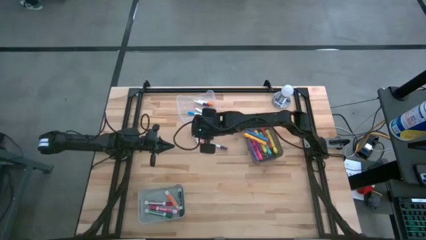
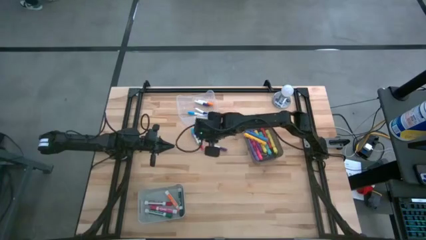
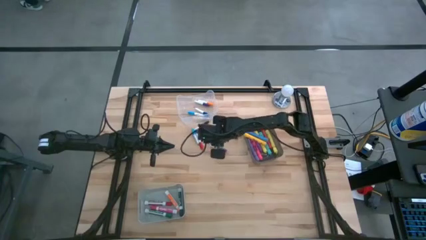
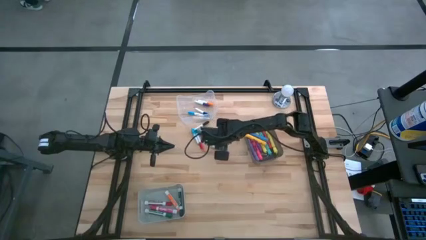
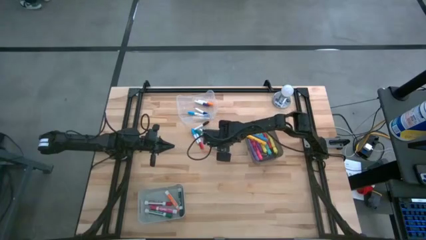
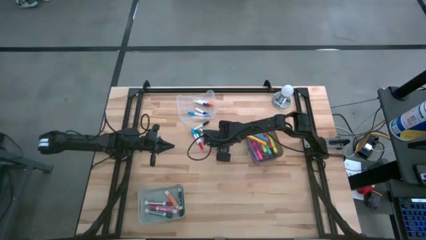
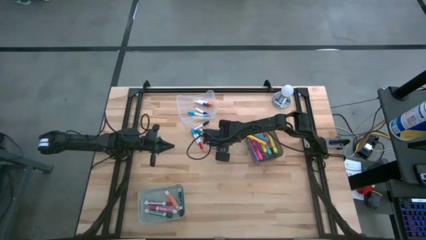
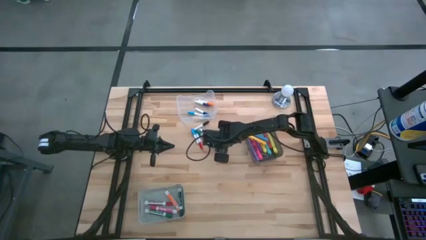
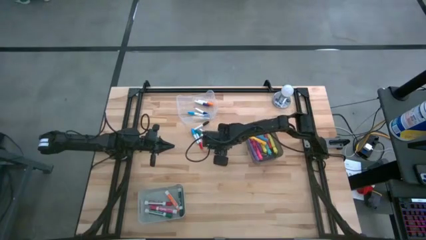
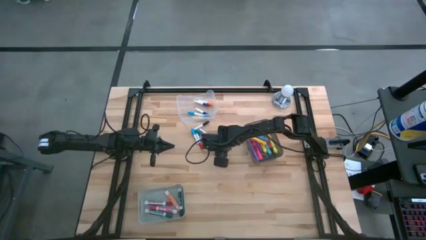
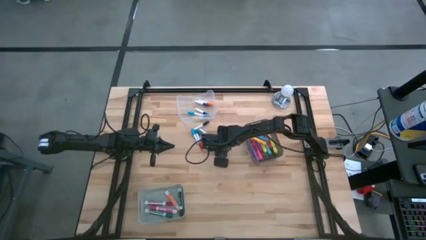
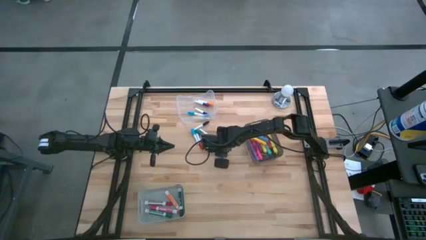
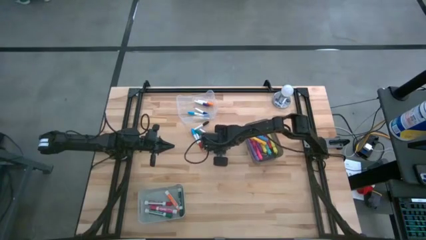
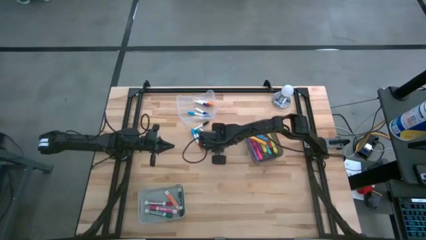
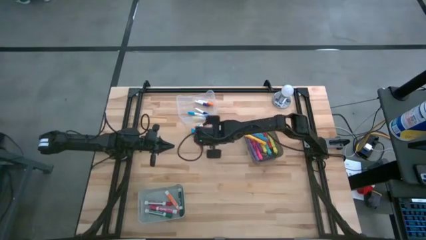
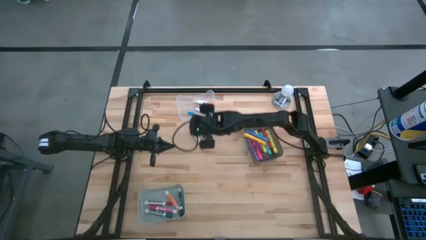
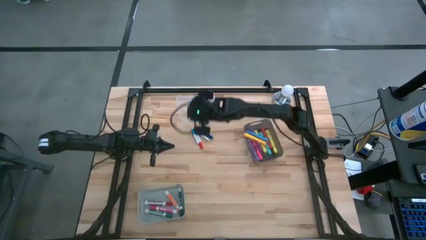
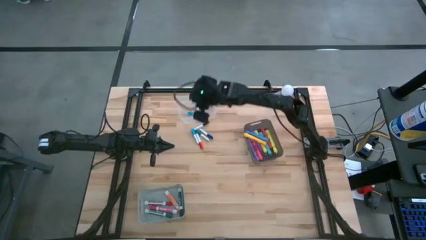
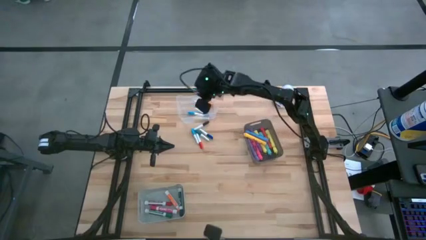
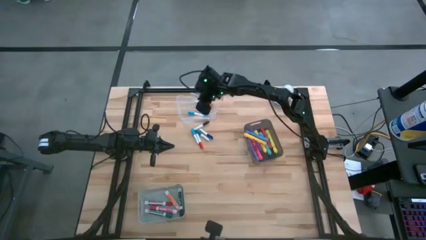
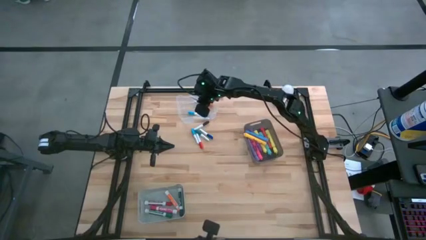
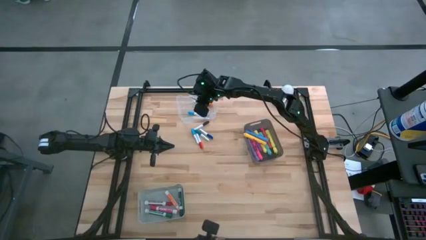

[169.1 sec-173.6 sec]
Task: Pick & Place Markers
Put the white and violet highlighter pen into the transparent bin

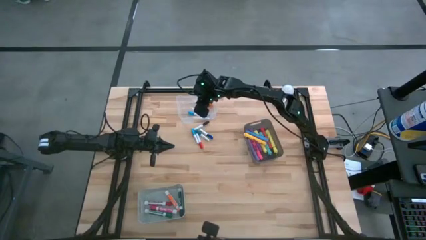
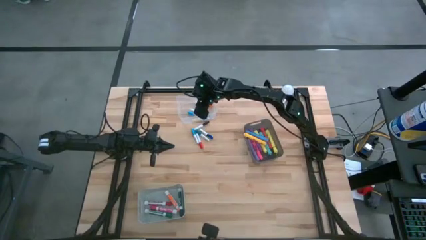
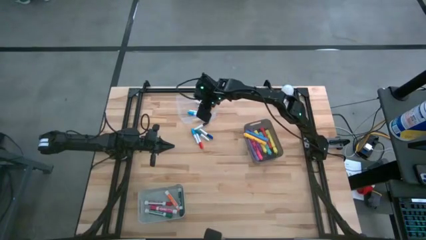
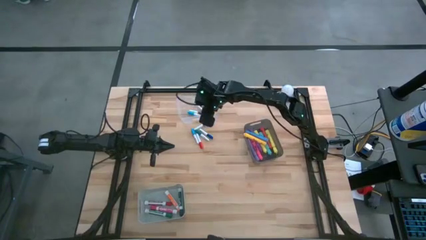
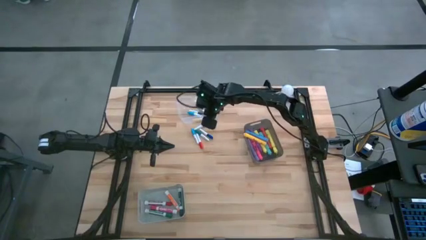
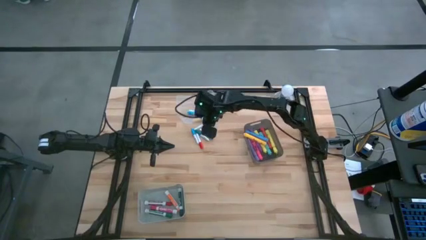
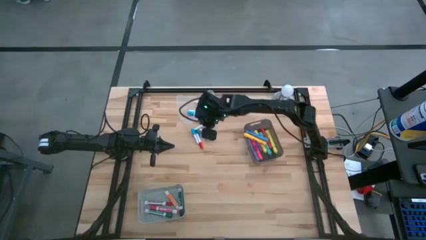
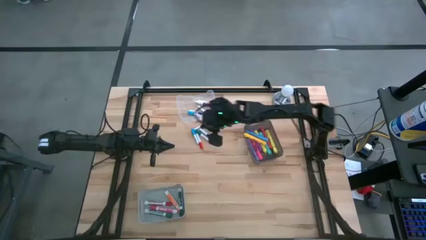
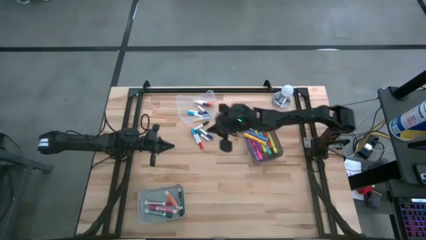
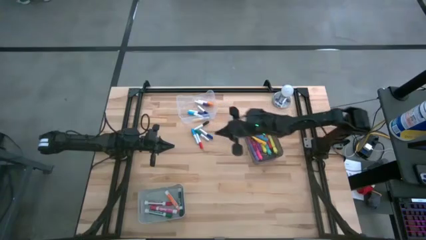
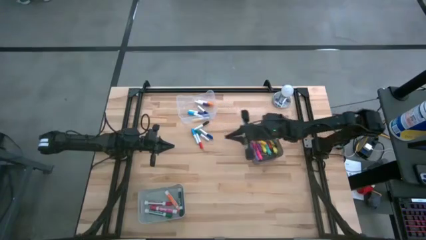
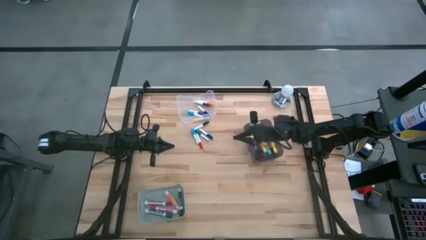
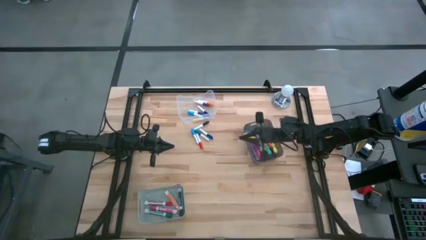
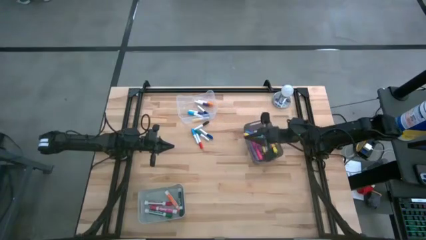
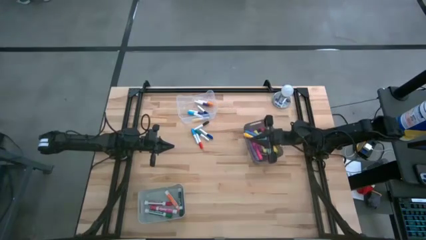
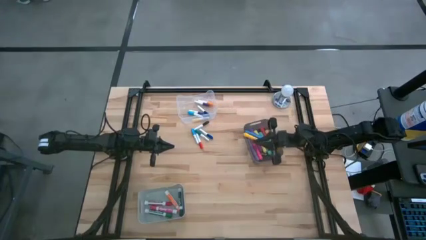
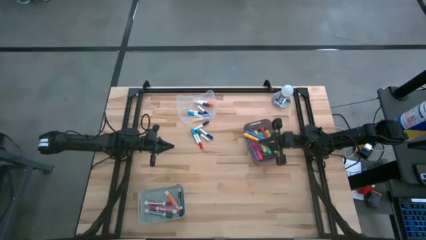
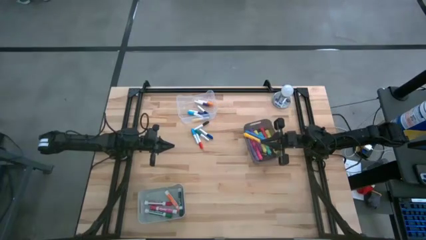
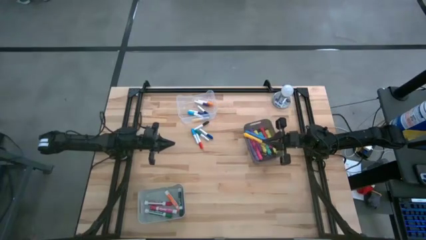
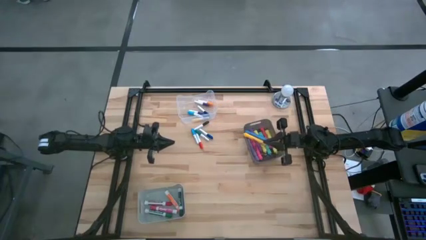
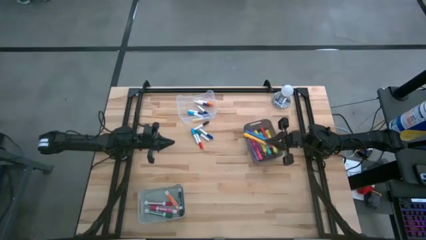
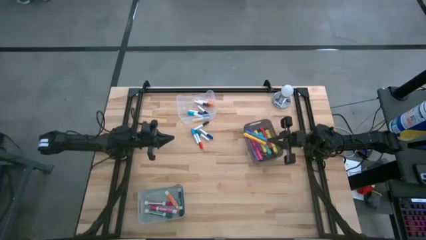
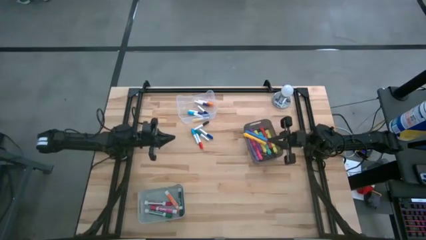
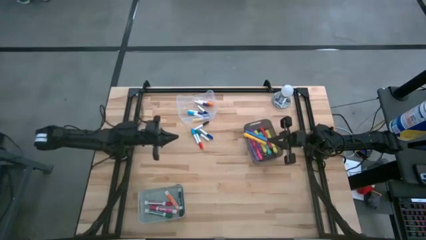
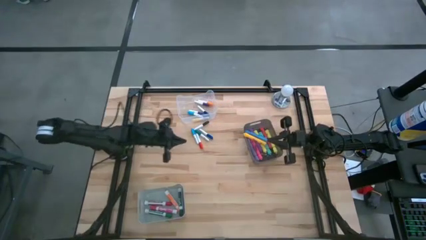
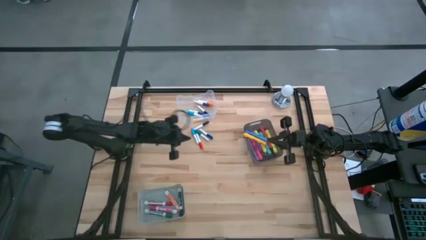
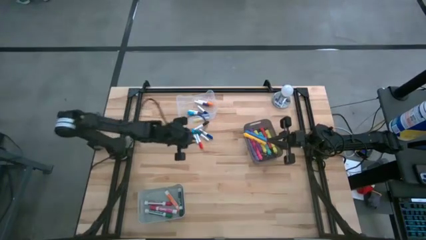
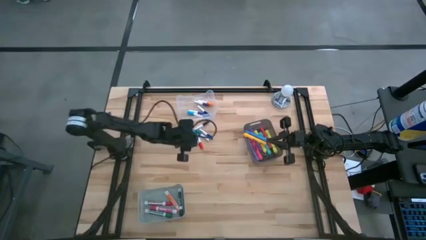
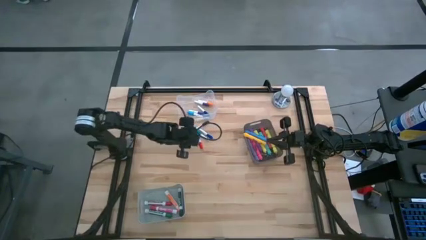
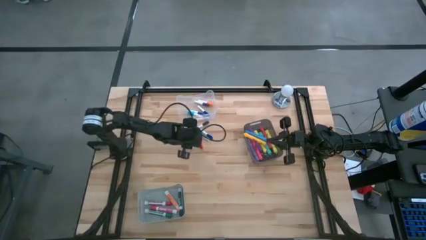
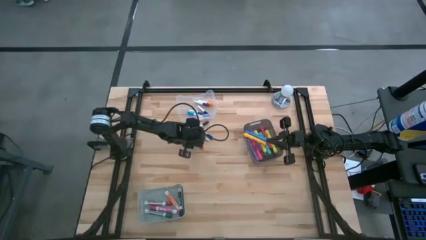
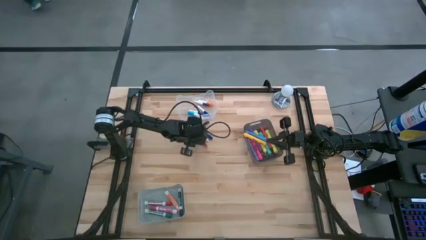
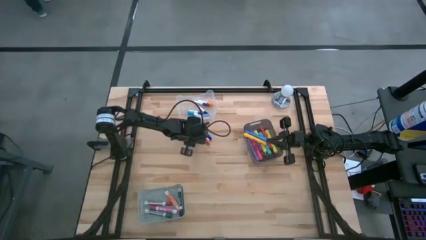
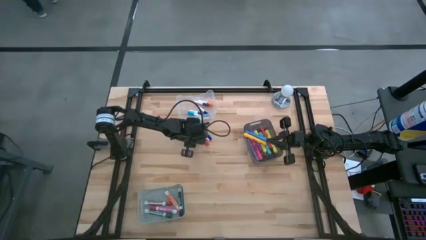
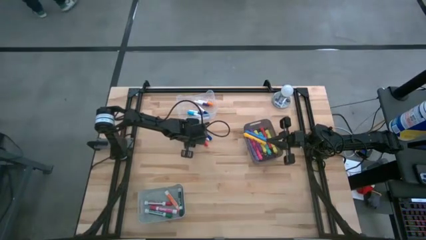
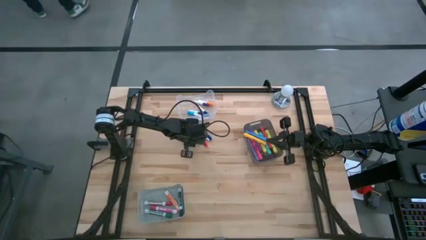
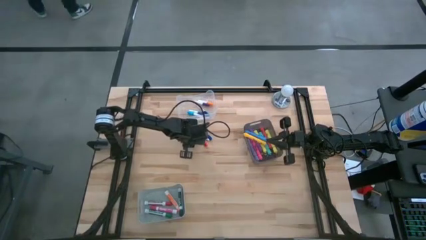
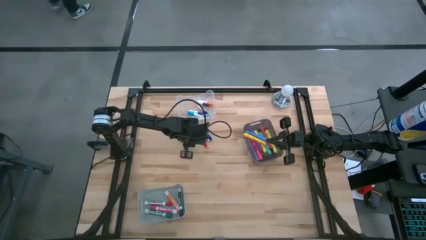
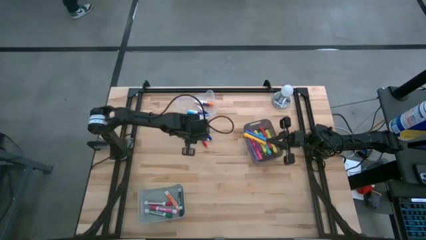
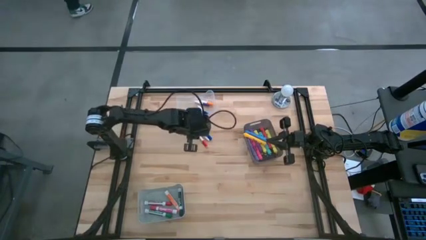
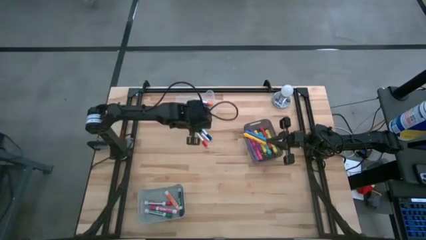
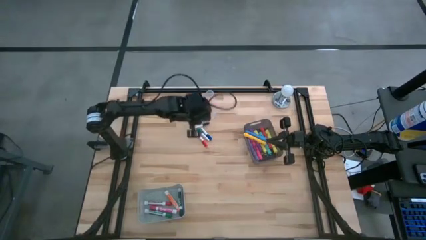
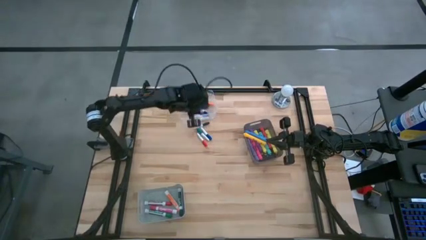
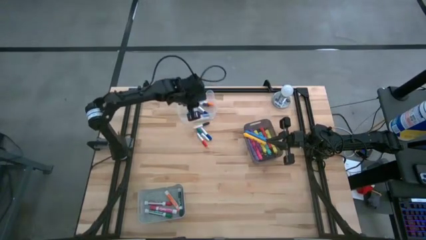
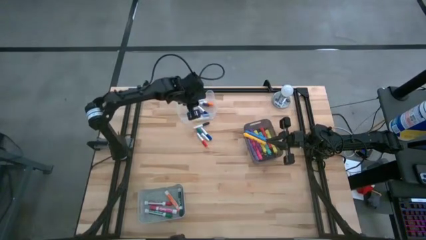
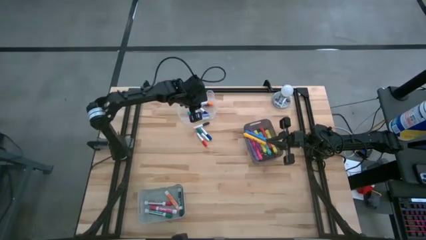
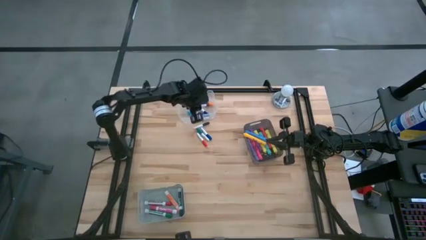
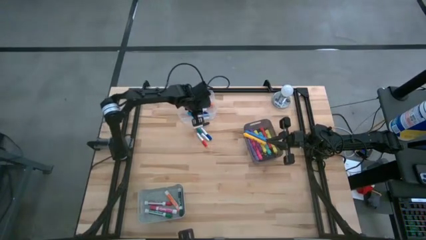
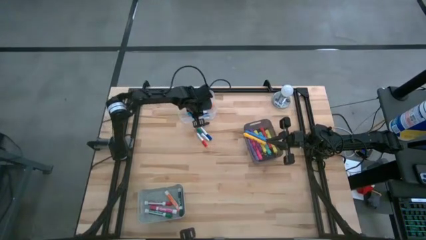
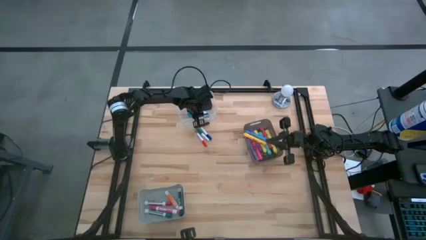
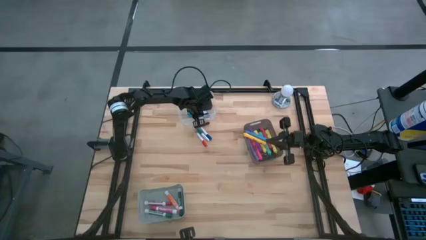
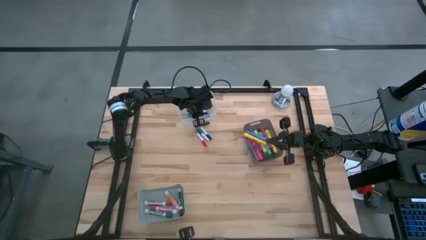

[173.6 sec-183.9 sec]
Put the white and light blue highlighter pen into the transparent bin

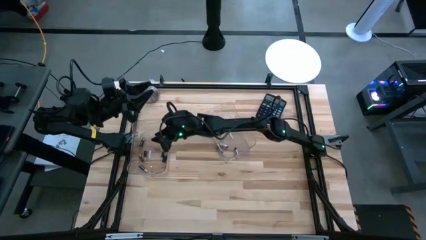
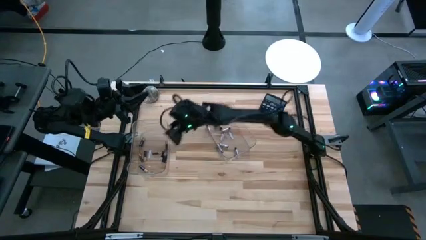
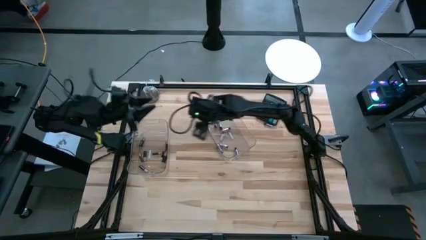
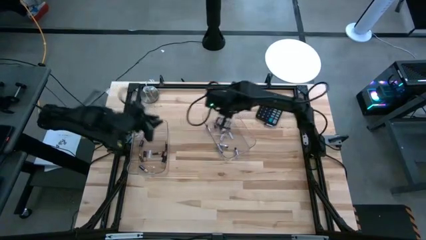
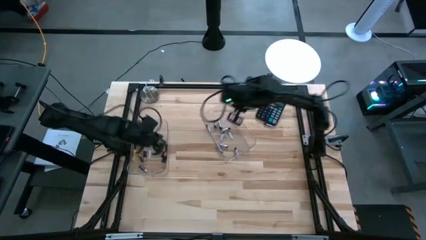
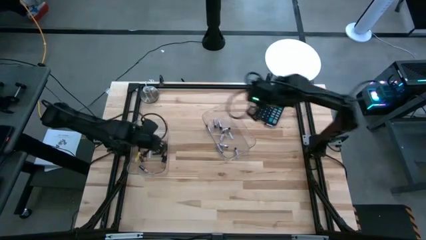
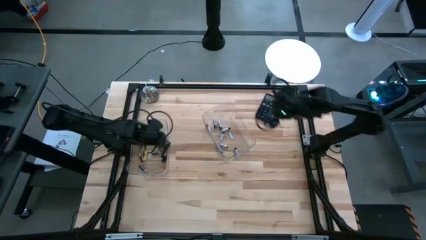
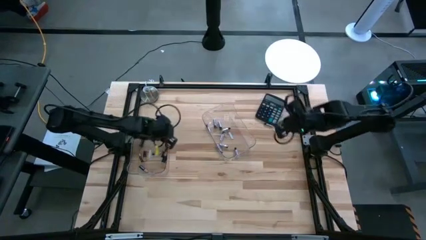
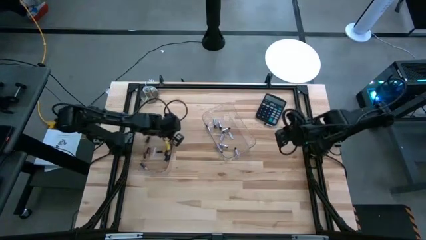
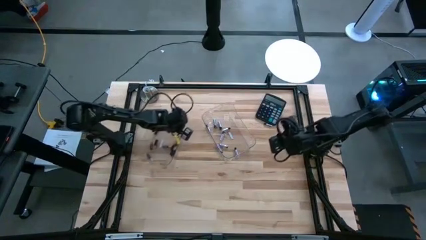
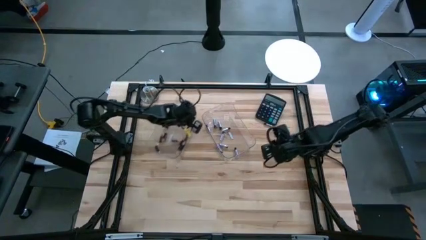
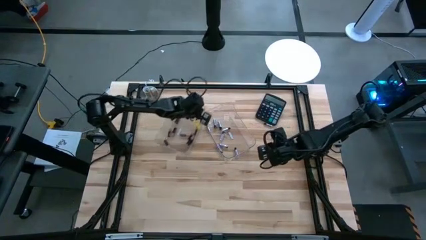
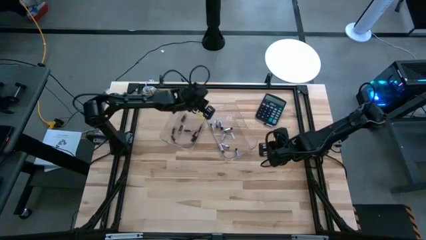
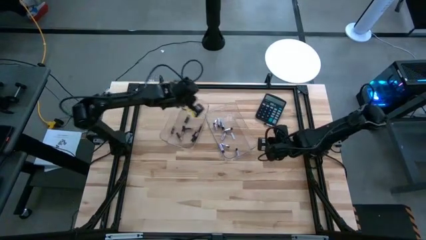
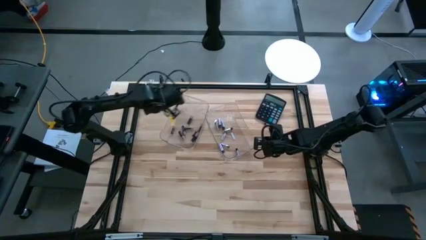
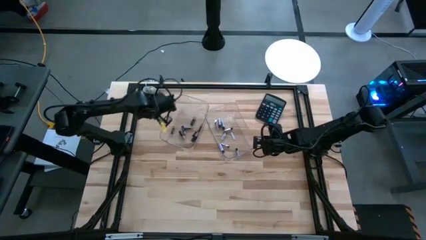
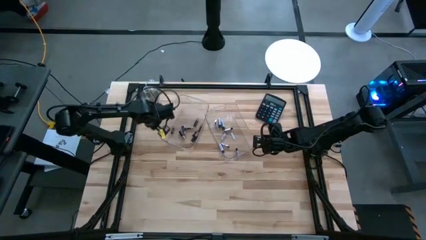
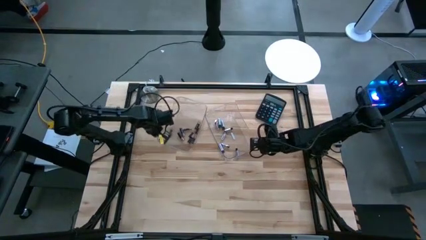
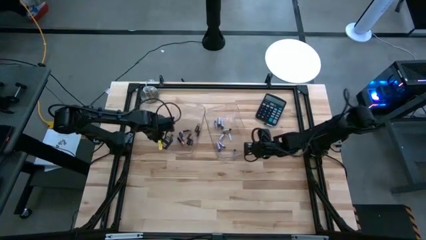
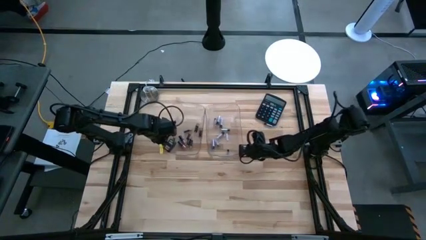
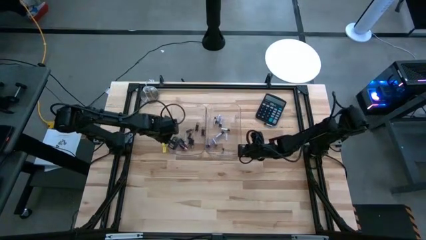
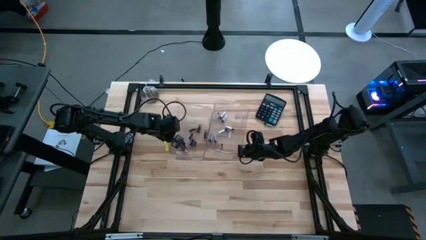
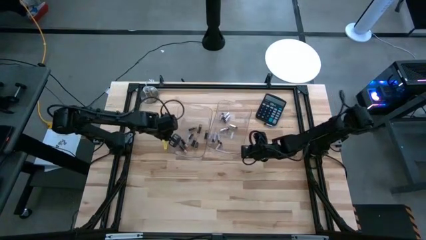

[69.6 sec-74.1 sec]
Task: Sort batteries
Adjust the transparent bins
